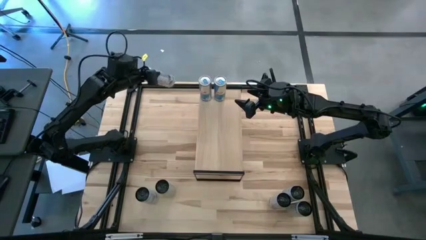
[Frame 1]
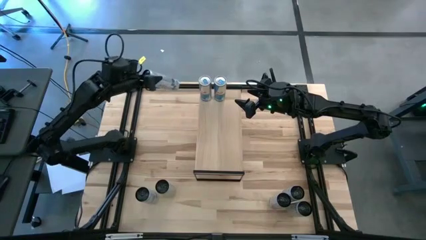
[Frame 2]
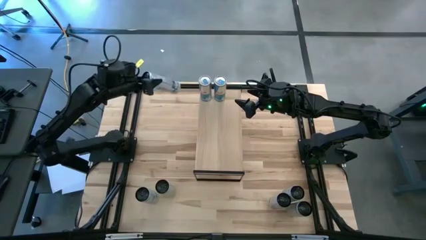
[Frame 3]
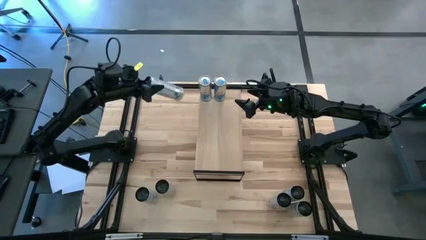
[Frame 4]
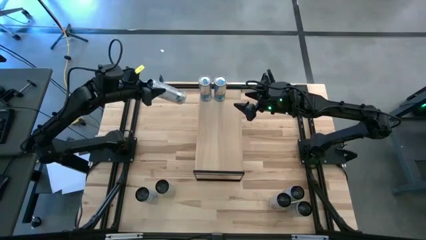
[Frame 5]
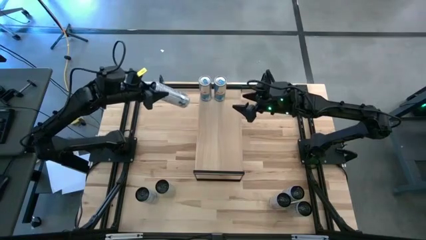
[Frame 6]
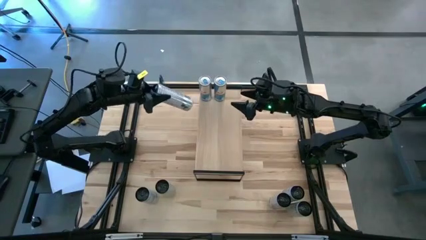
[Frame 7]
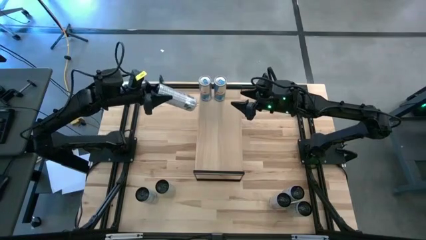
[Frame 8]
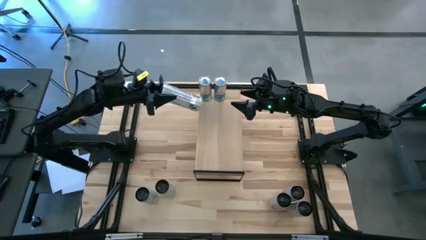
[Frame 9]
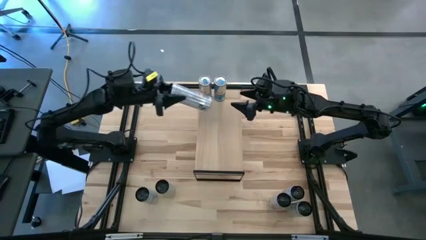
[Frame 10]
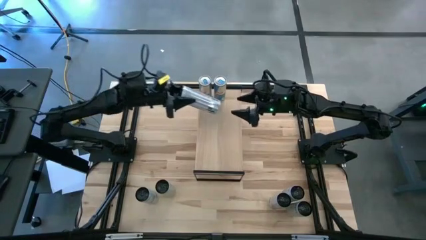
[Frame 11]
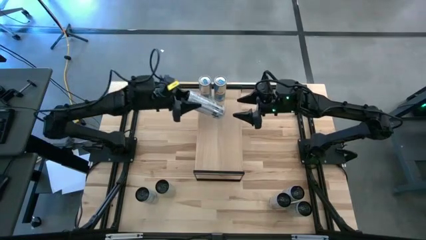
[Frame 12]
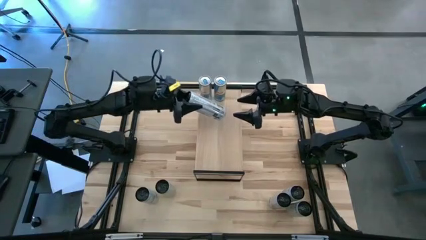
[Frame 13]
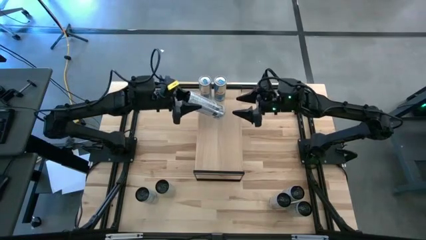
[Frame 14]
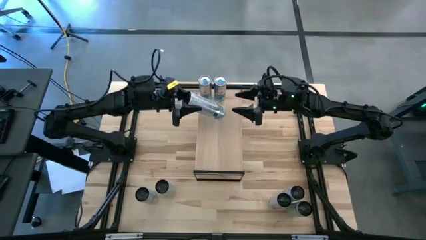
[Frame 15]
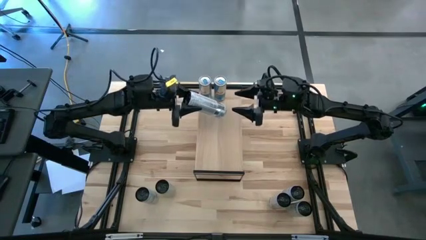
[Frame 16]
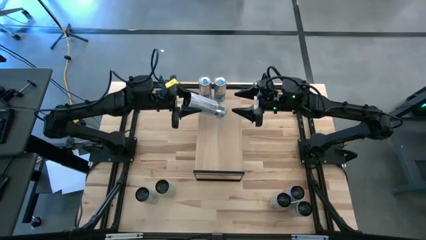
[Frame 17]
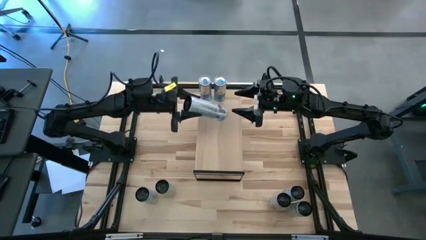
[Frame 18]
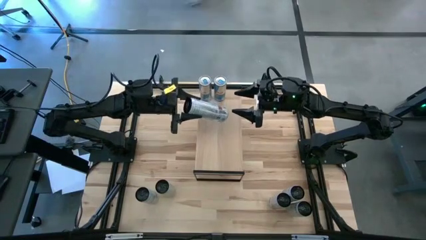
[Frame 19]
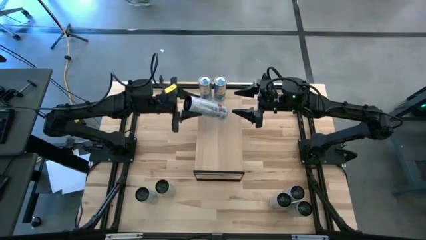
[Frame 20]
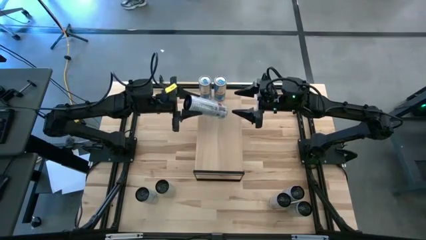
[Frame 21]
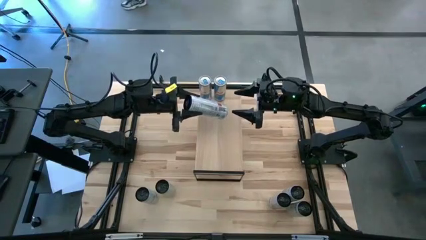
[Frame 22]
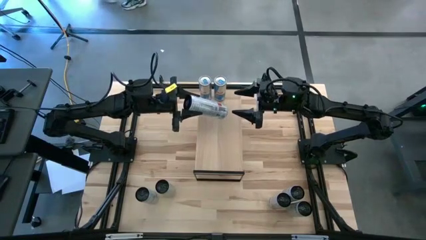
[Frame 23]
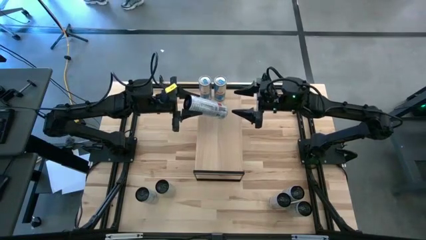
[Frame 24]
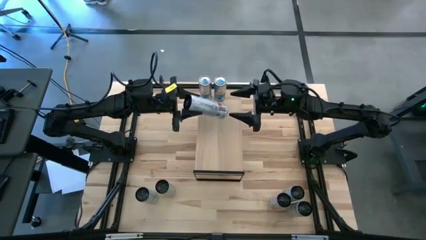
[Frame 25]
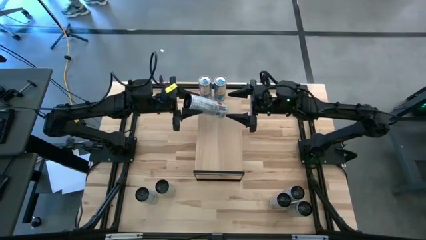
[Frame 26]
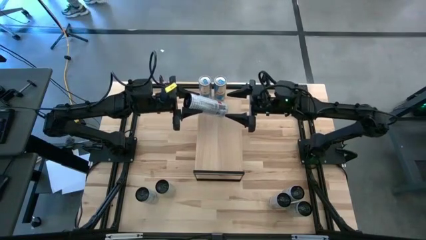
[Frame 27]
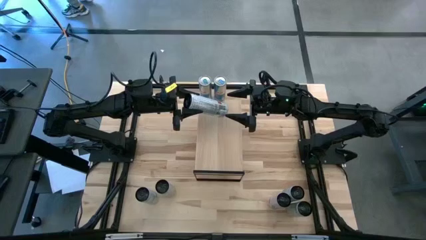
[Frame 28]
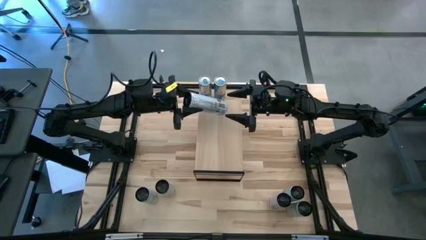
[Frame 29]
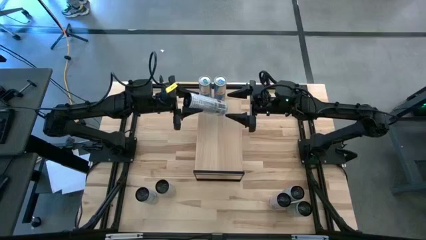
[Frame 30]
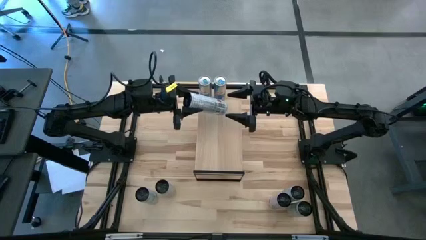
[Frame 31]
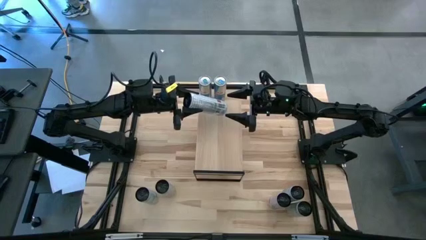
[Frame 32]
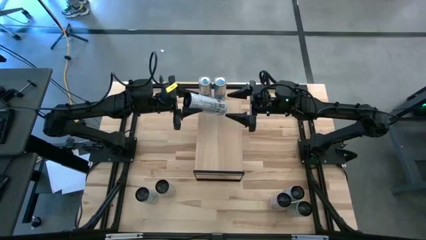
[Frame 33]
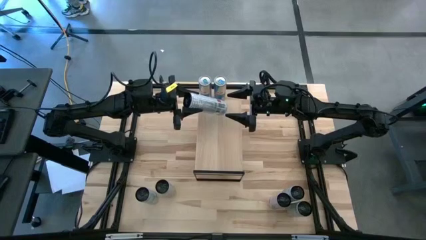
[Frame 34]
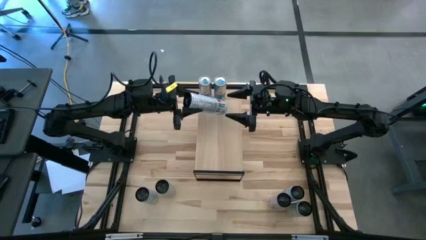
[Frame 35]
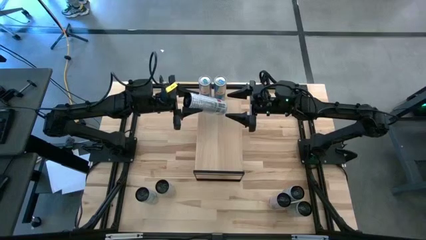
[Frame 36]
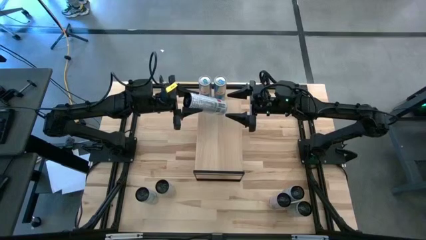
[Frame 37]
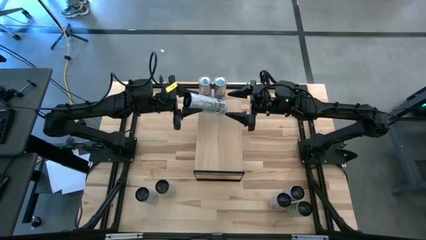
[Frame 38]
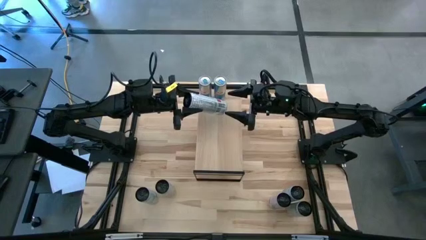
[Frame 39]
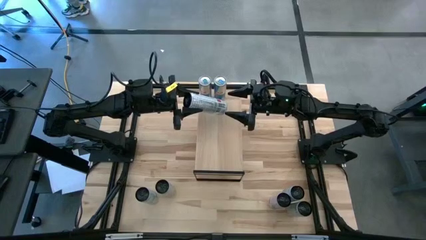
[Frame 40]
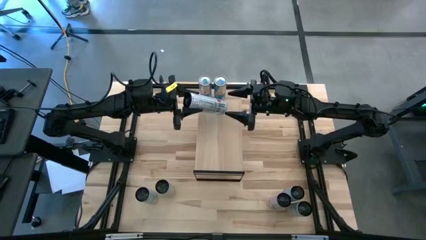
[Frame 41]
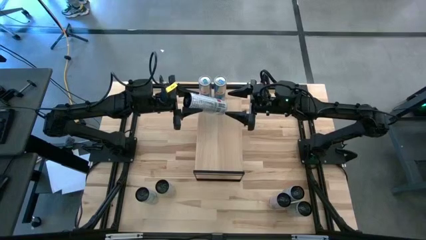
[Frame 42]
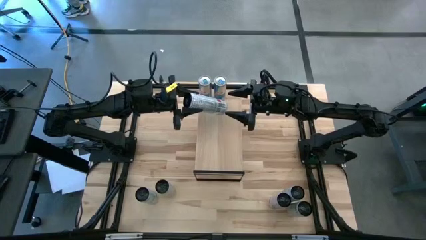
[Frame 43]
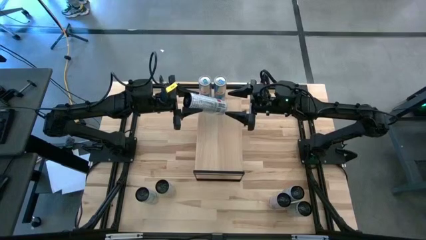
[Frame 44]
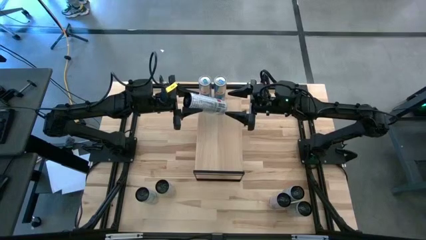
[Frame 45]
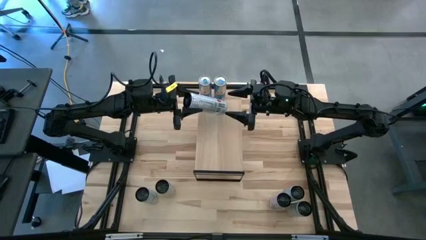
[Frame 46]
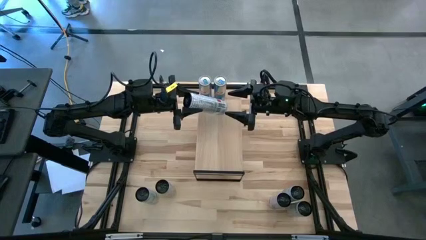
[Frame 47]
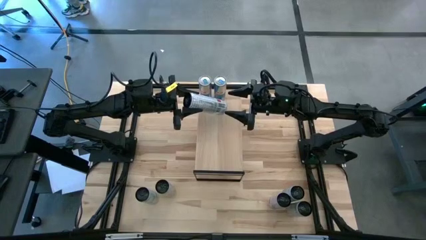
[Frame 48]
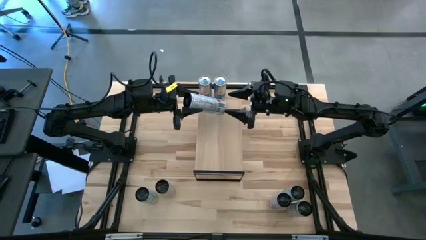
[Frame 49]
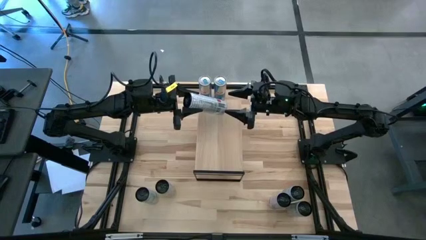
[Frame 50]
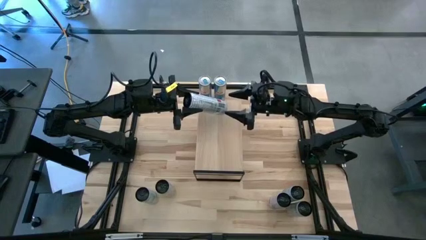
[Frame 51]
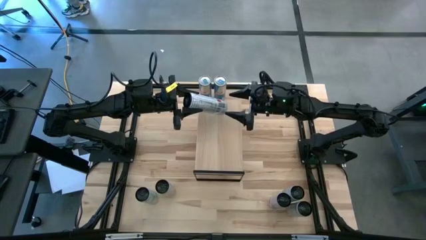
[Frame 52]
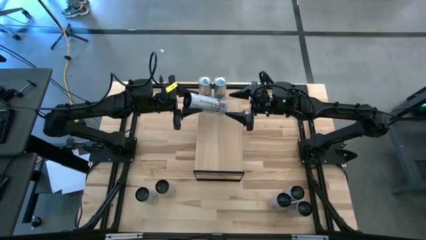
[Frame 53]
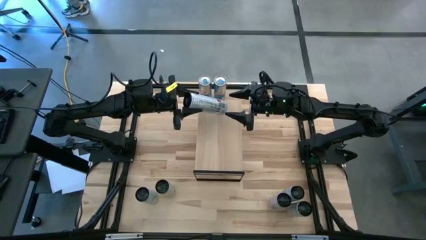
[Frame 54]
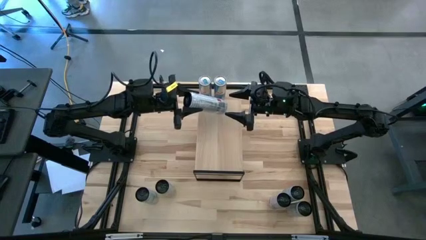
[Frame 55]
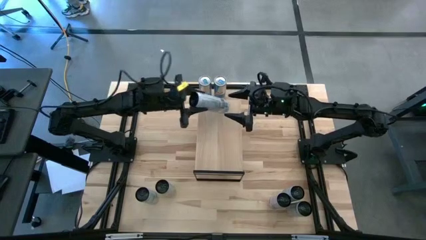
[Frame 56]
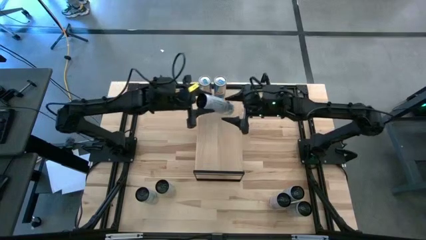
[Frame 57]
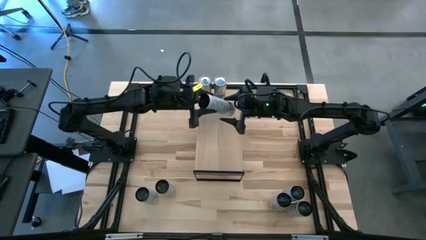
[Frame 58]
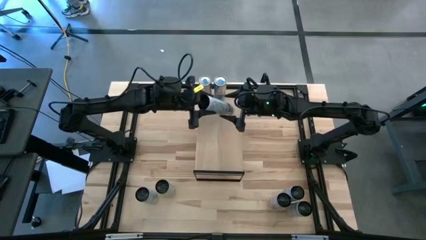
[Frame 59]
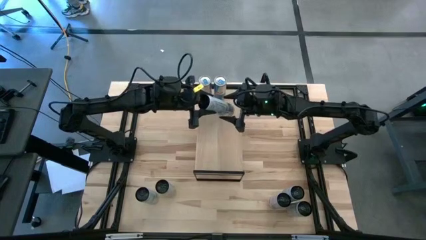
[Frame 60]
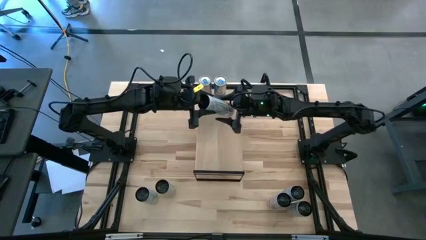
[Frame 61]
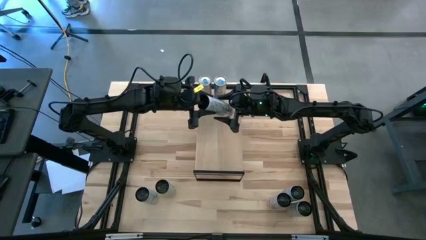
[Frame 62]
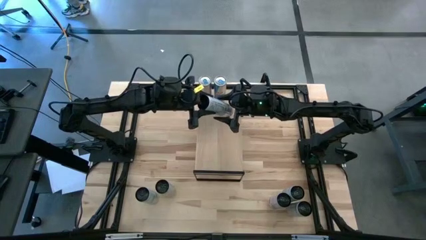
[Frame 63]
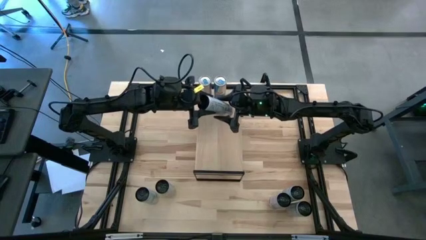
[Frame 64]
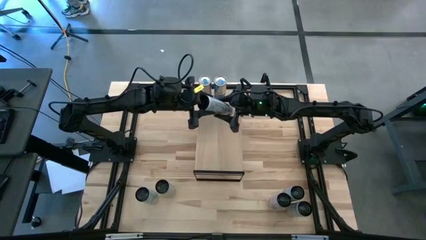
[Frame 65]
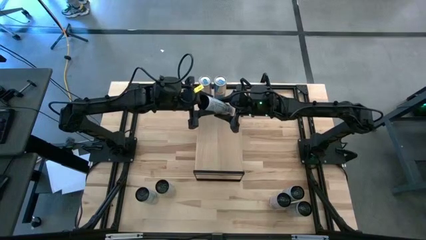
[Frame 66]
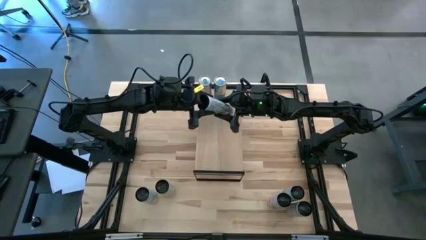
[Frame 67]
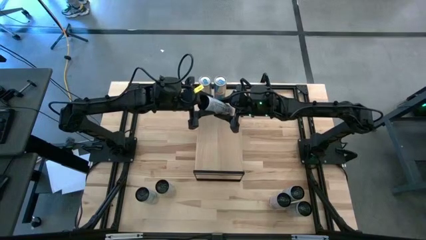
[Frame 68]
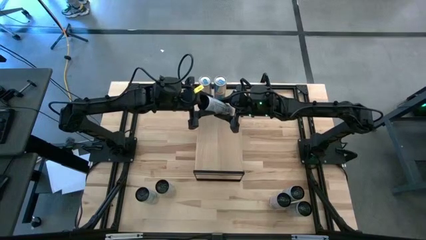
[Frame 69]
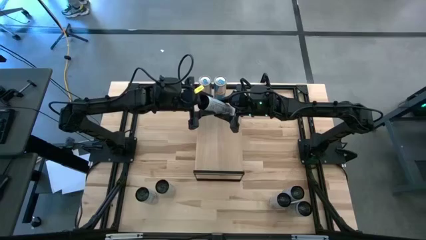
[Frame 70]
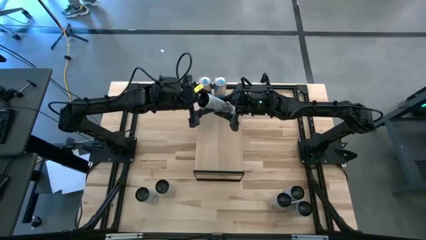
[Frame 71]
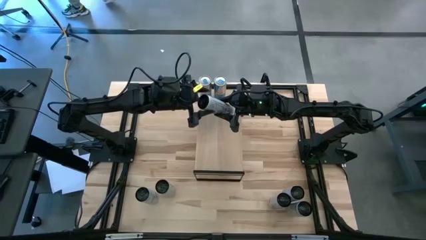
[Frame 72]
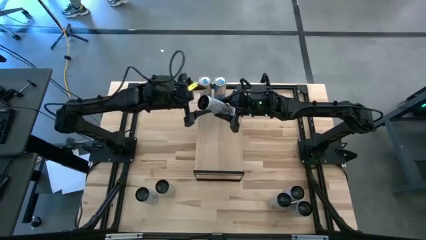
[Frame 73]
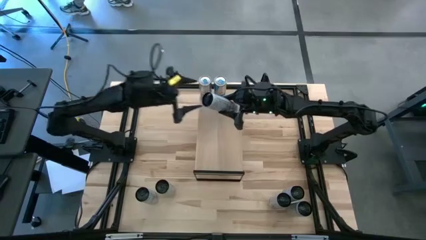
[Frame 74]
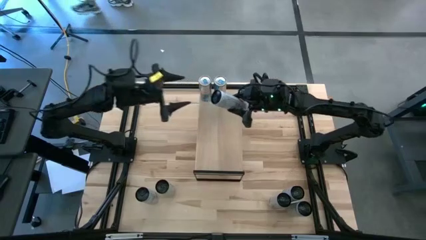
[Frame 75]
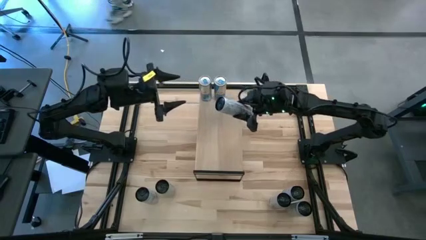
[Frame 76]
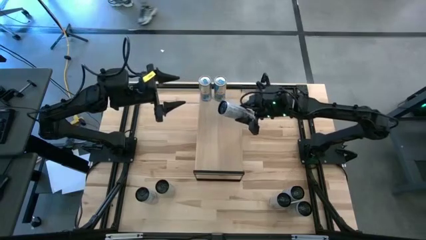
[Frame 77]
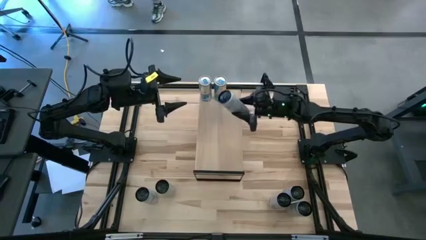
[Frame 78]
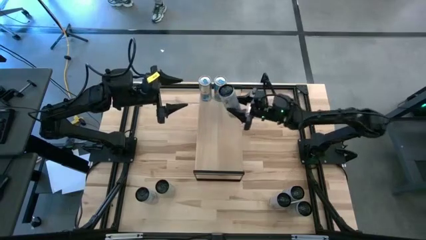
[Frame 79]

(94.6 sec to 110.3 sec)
Task: Place canned beverage on shelf
Put the top white pink soda can on the shelf
